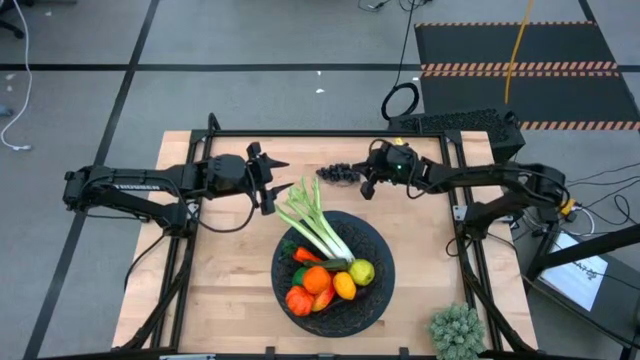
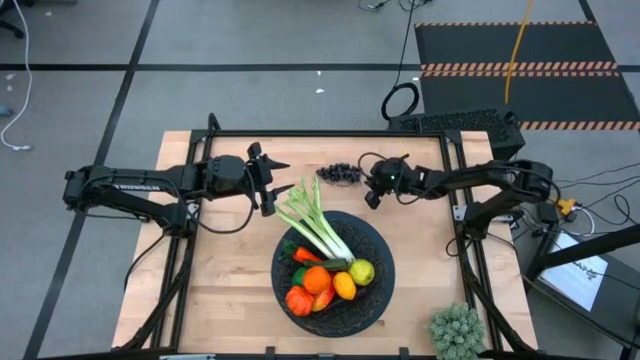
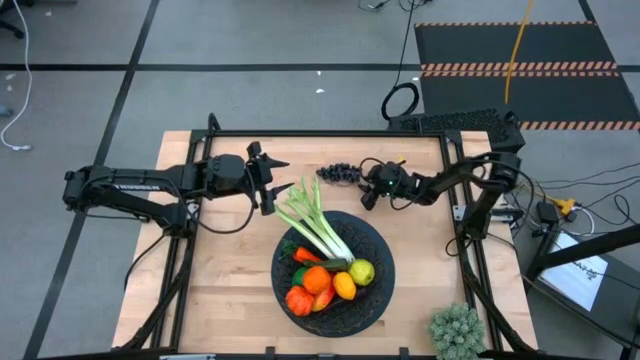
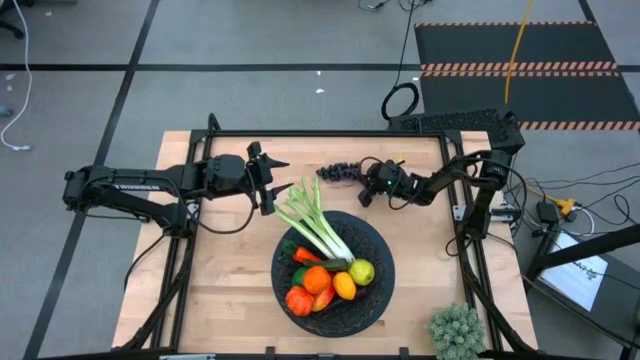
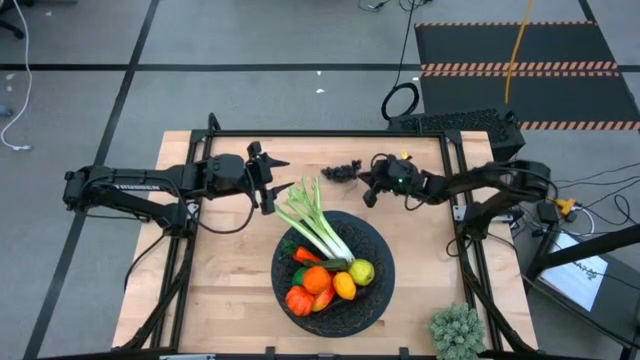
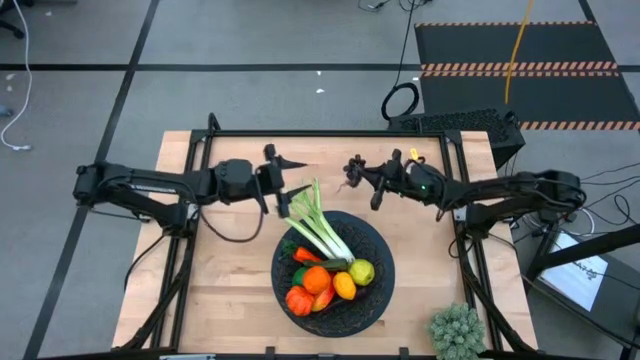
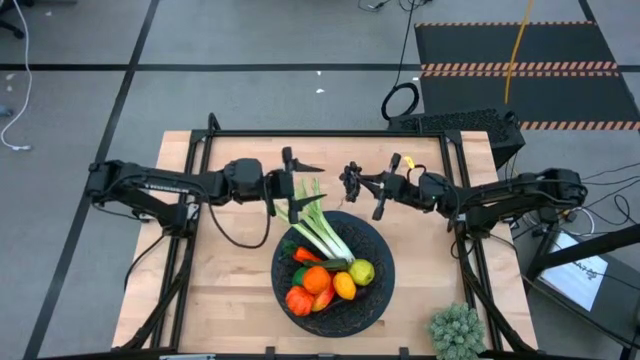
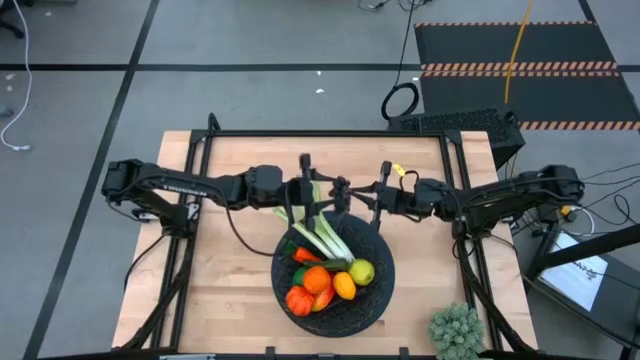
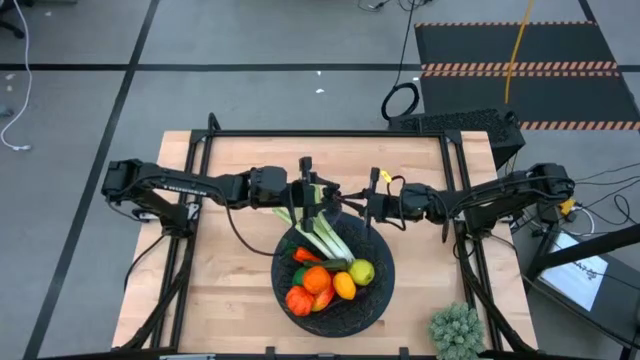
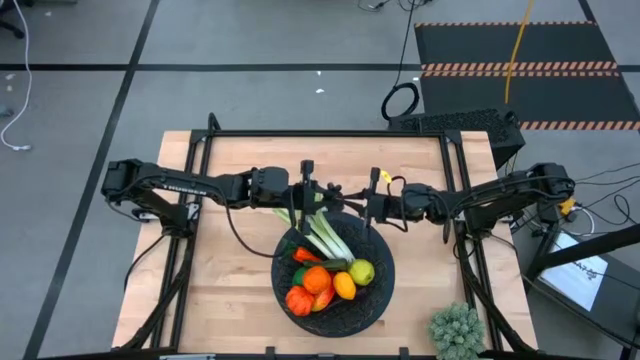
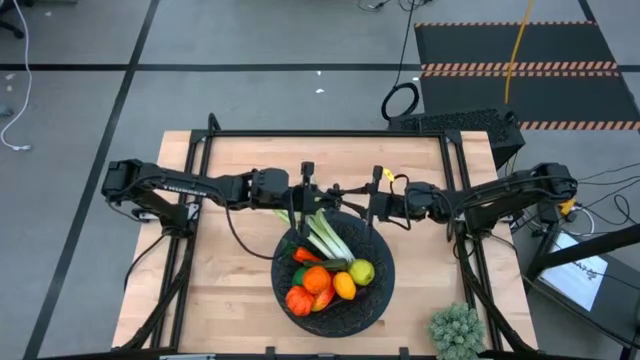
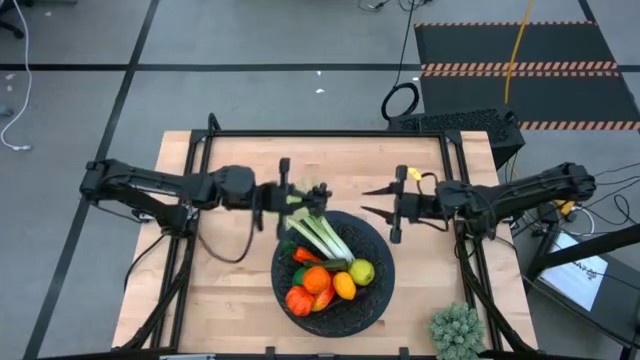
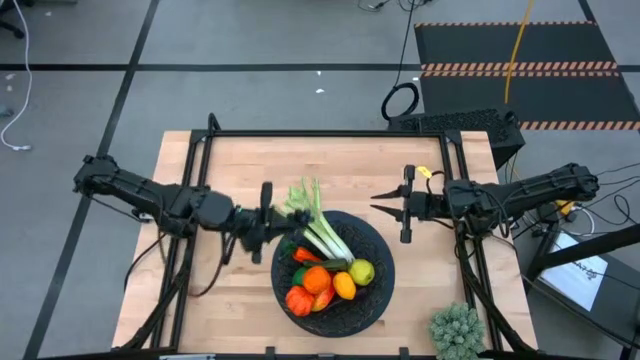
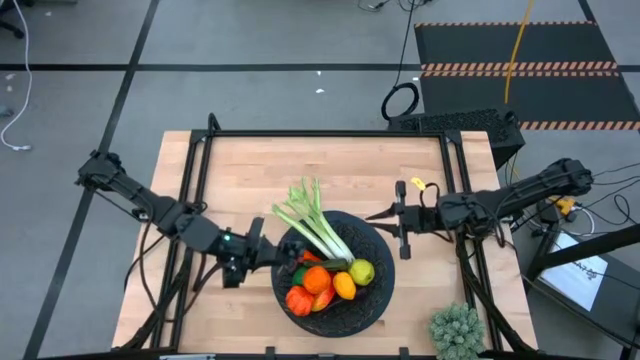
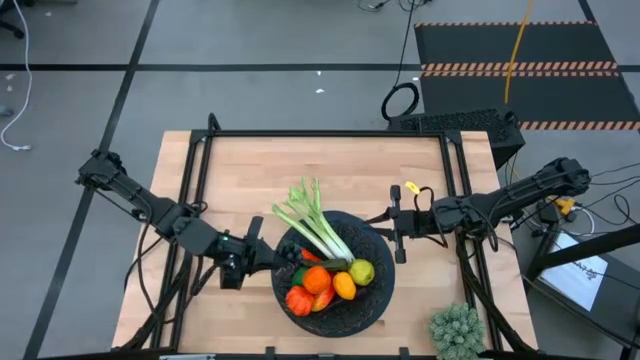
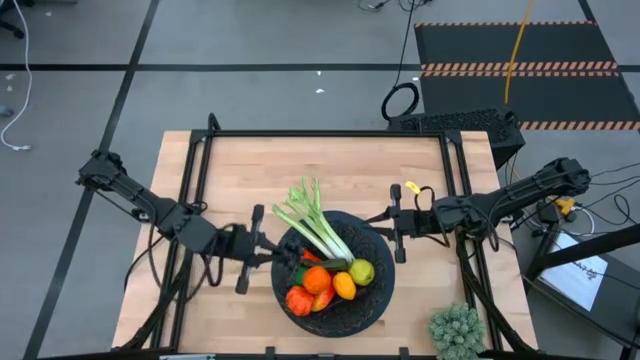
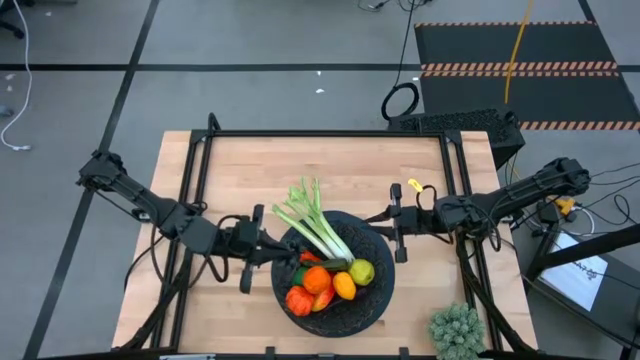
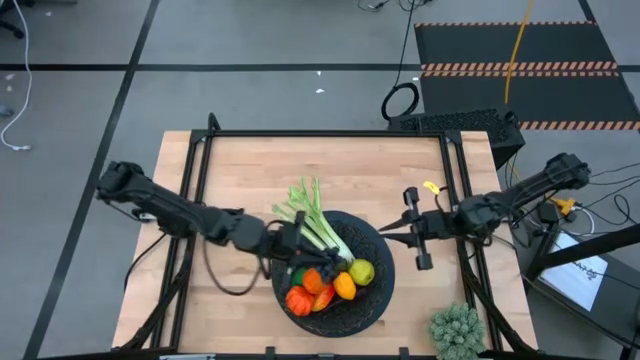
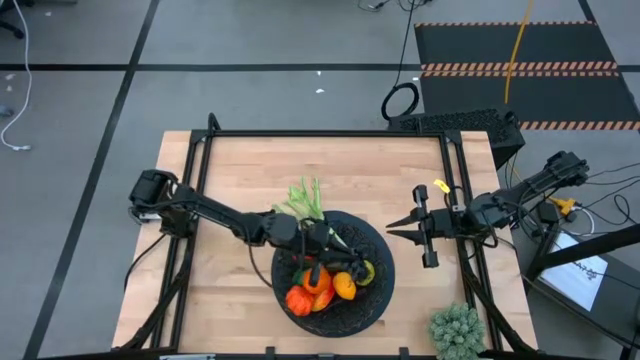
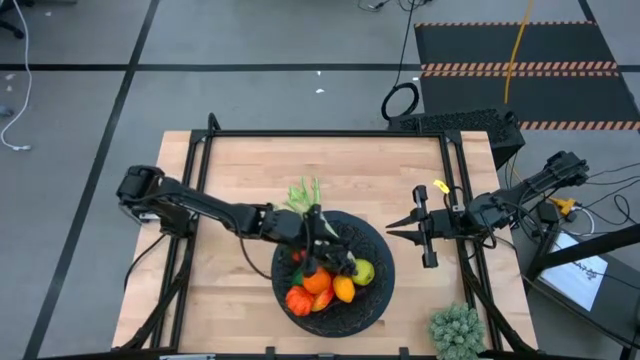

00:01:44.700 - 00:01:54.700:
Task: Build produce basket
Put the violet grapes into the black mesh basket

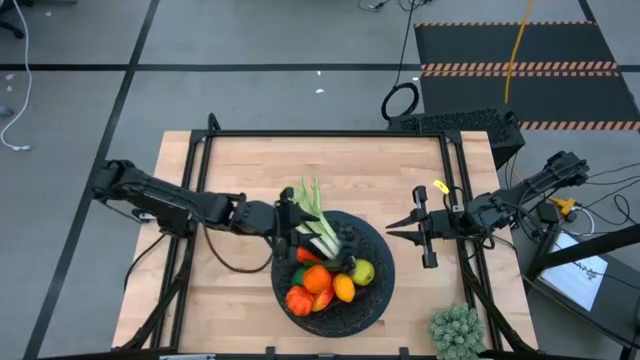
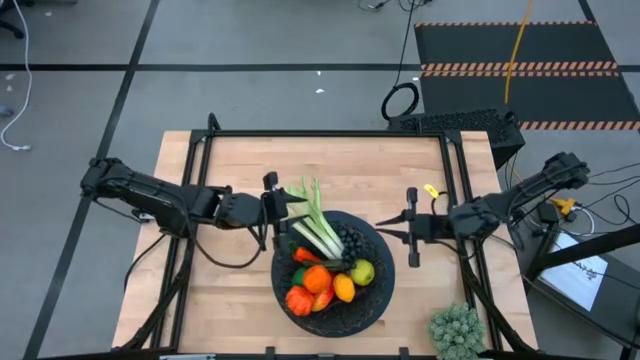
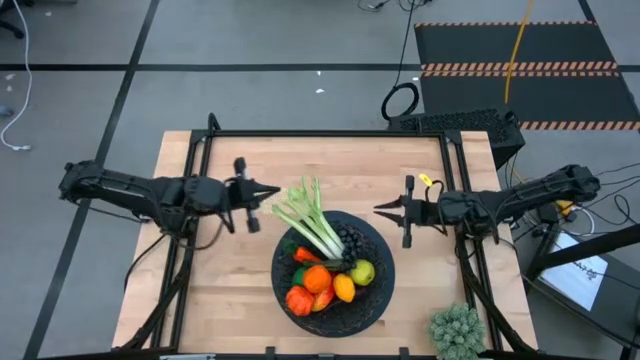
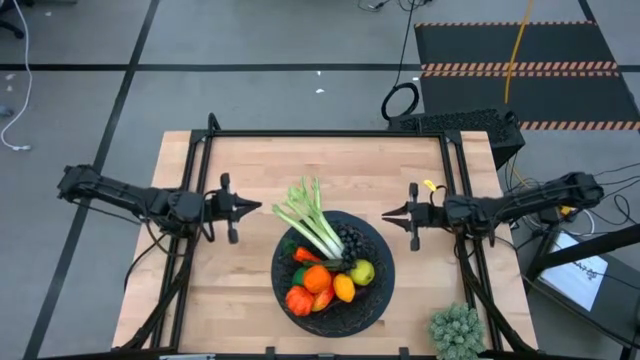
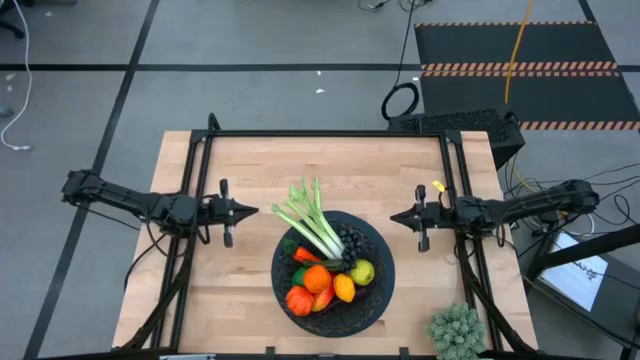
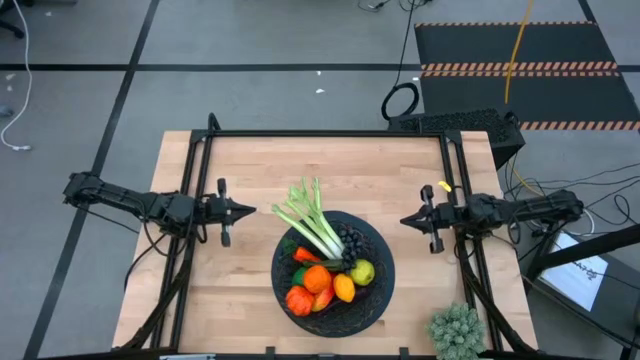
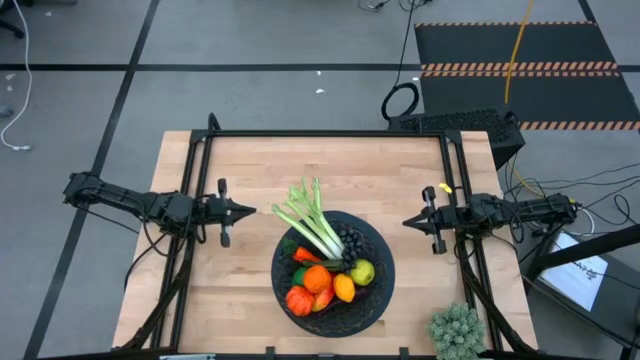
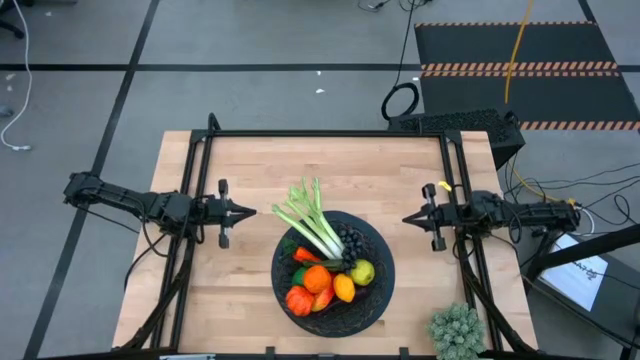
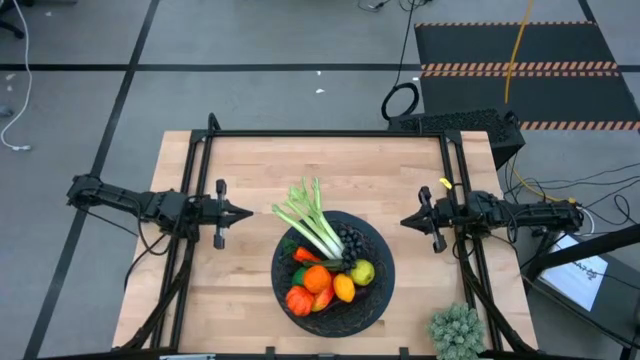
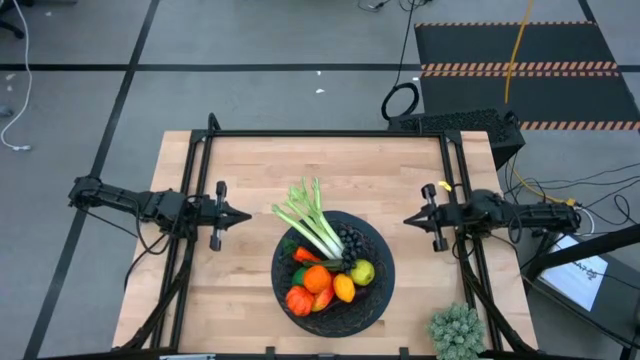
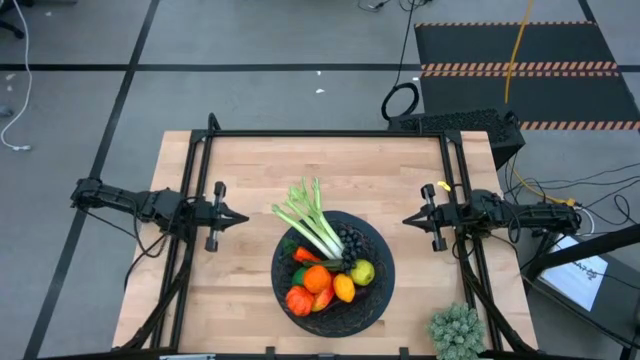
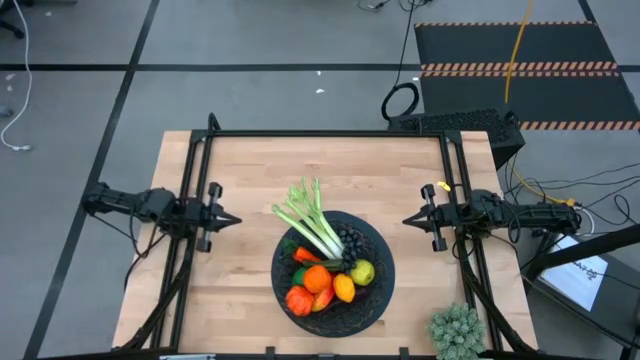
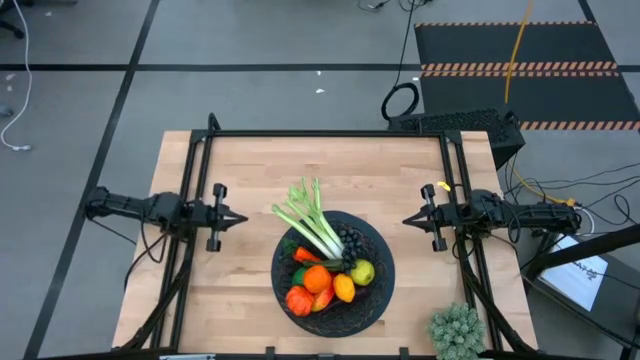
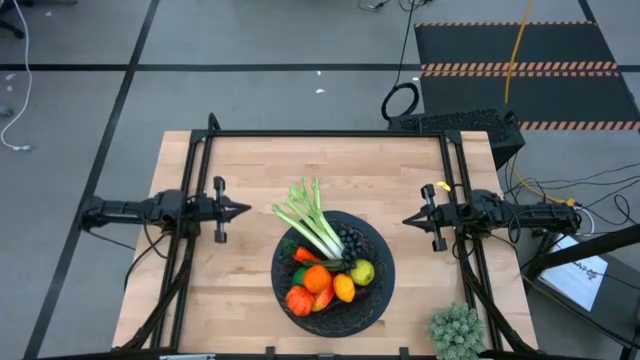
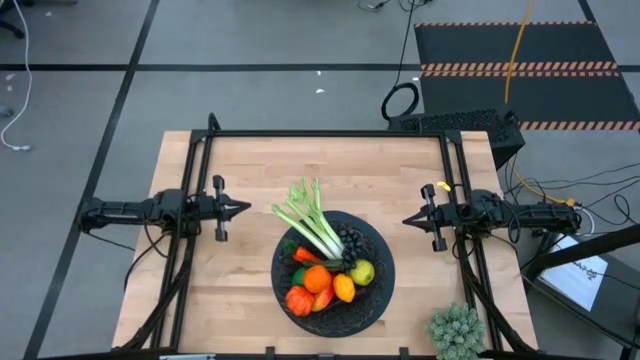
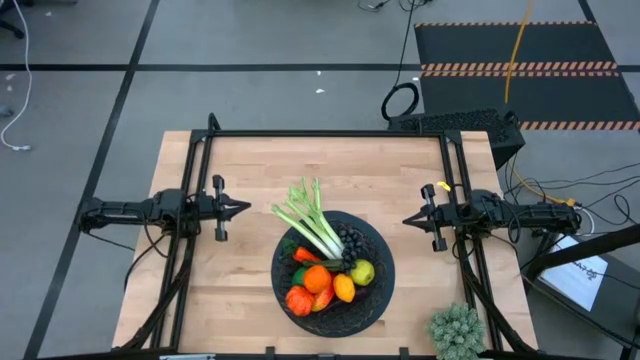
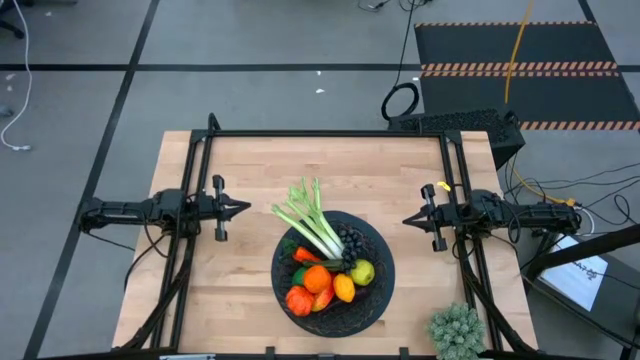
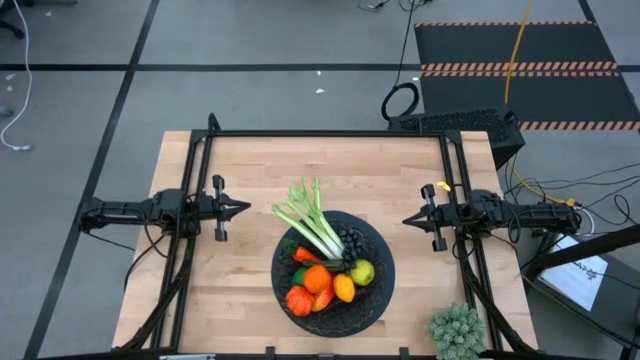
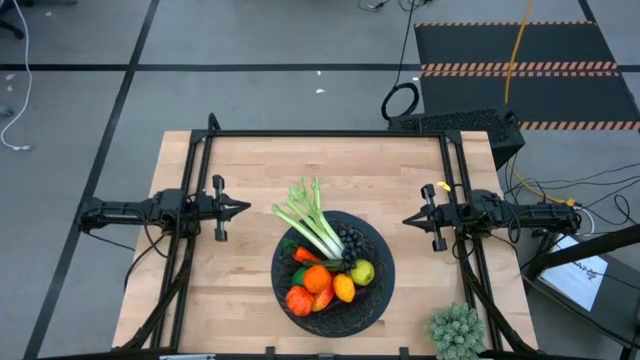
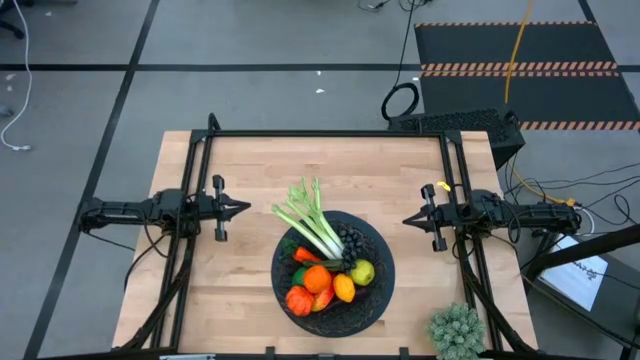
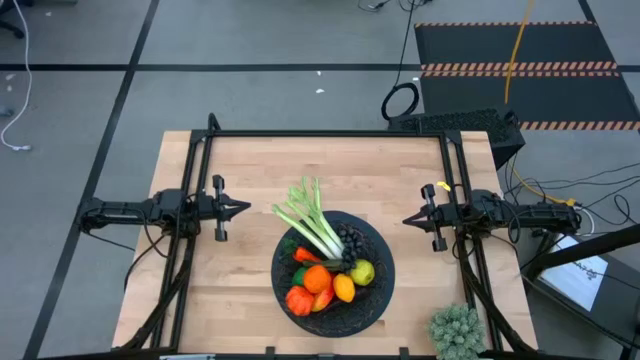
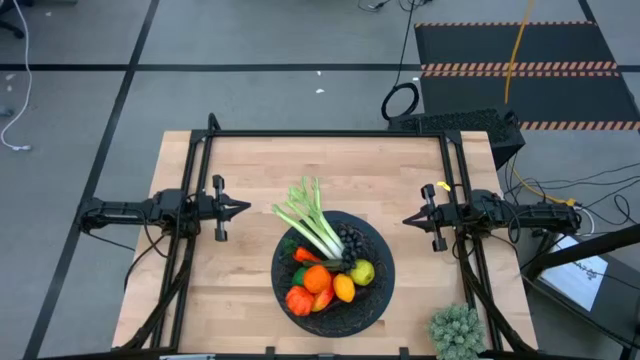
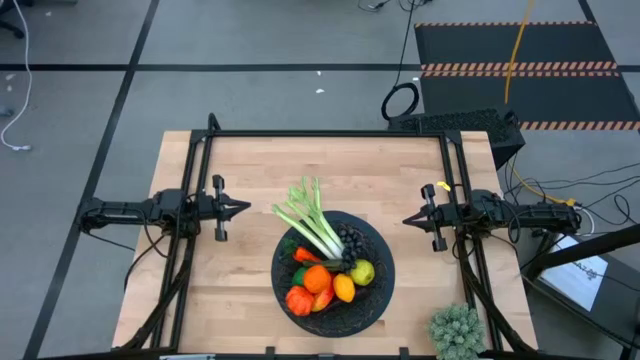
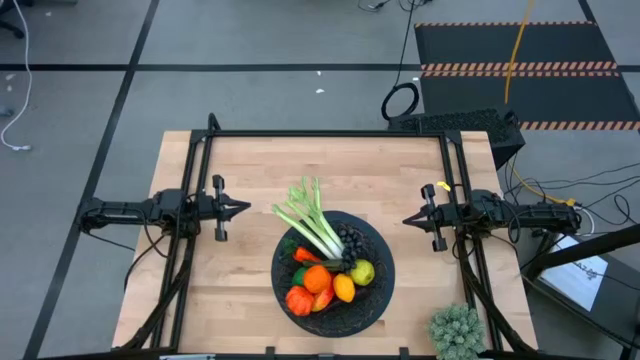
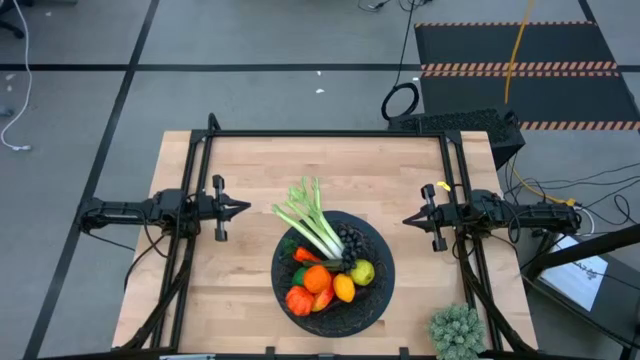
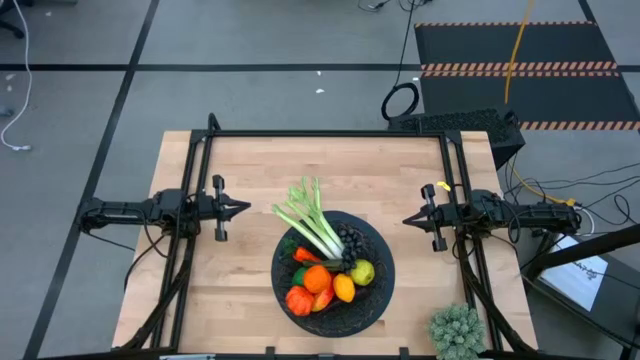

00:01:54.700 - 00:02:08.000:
Return to Home Position
